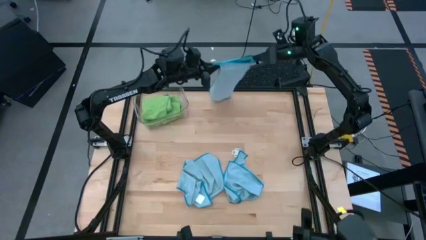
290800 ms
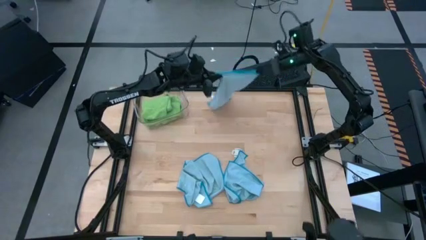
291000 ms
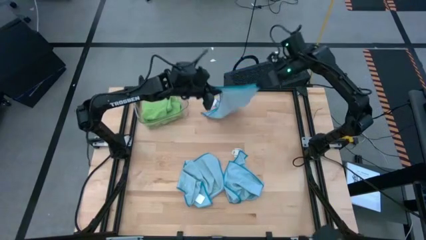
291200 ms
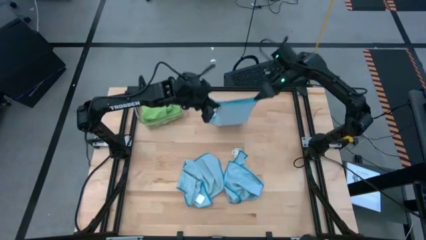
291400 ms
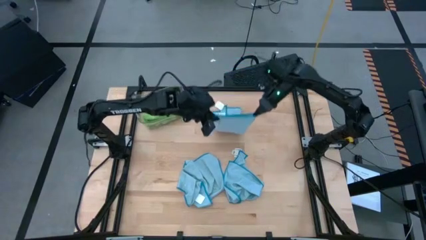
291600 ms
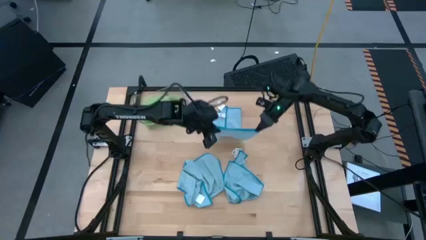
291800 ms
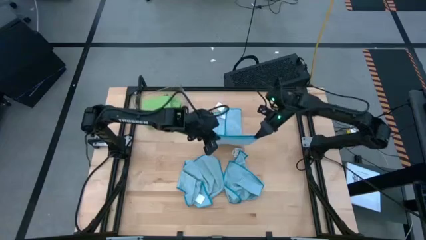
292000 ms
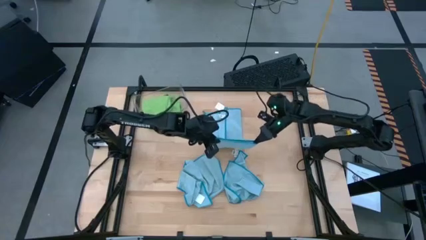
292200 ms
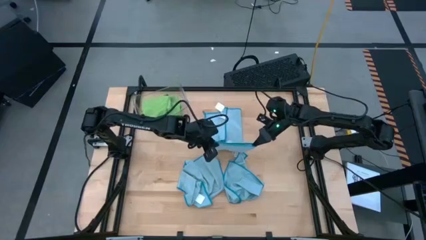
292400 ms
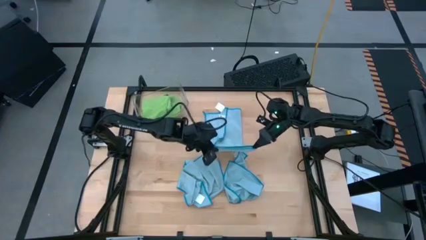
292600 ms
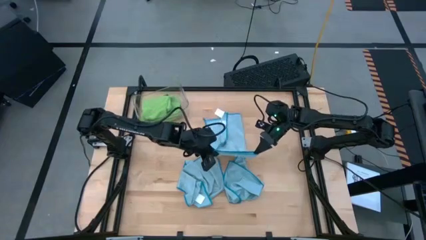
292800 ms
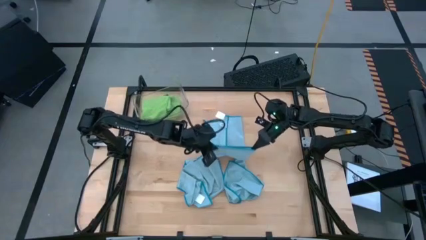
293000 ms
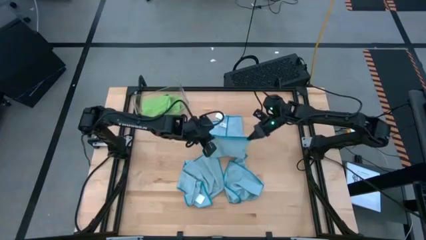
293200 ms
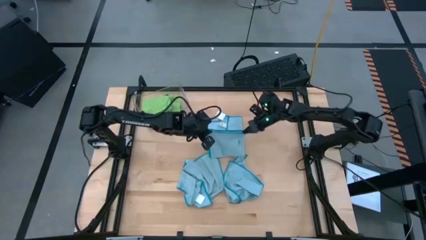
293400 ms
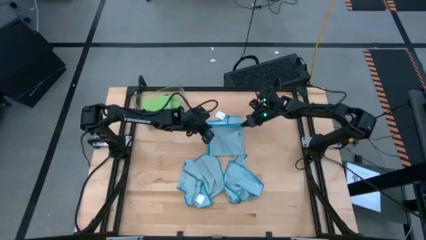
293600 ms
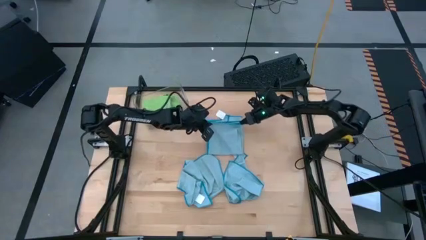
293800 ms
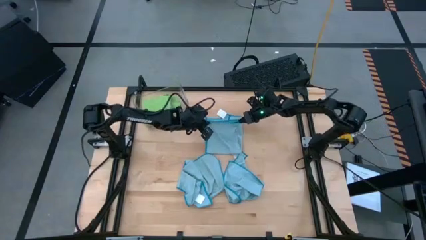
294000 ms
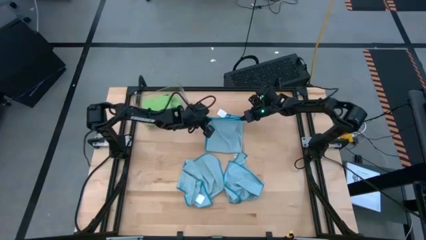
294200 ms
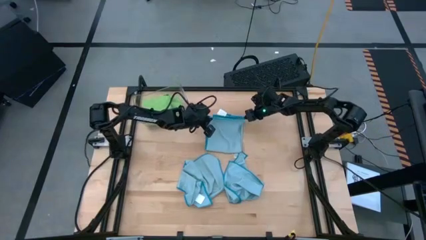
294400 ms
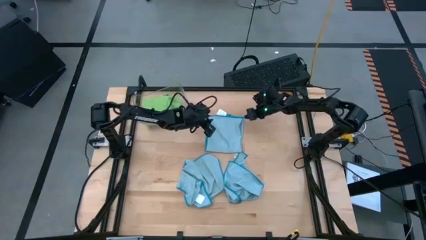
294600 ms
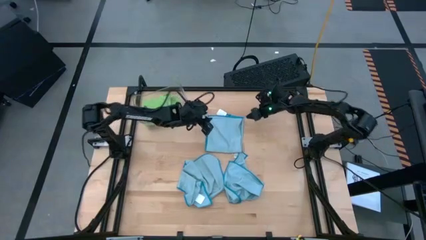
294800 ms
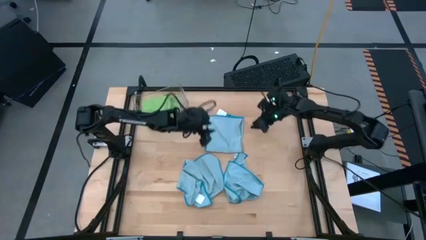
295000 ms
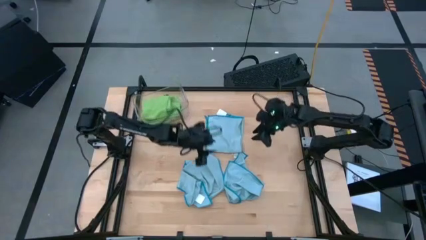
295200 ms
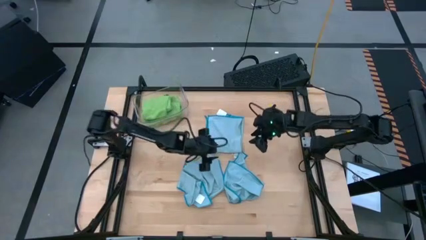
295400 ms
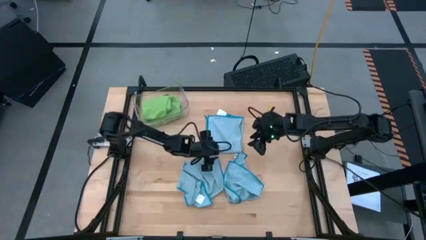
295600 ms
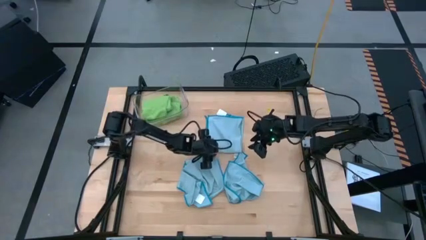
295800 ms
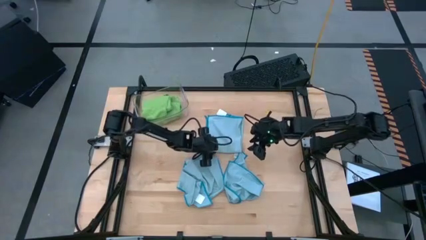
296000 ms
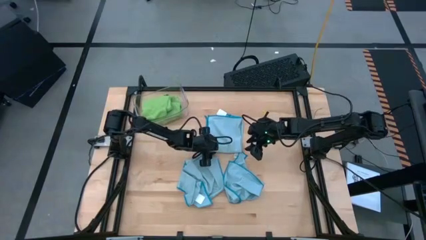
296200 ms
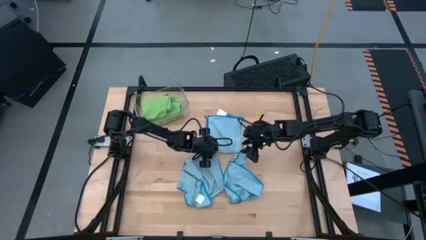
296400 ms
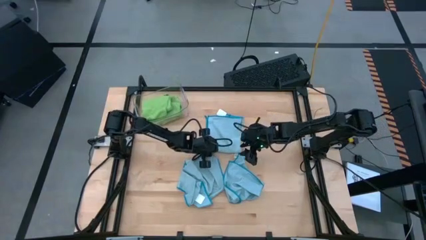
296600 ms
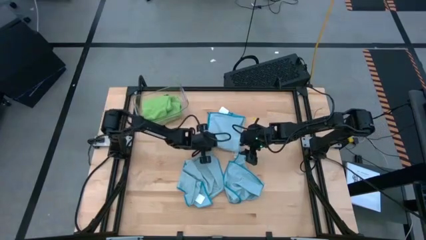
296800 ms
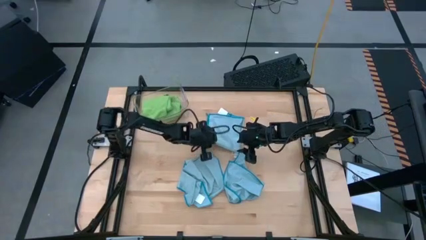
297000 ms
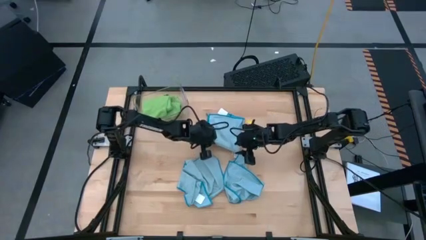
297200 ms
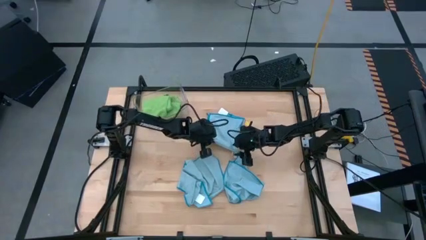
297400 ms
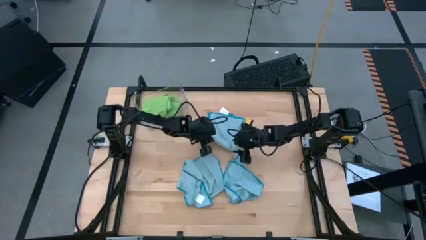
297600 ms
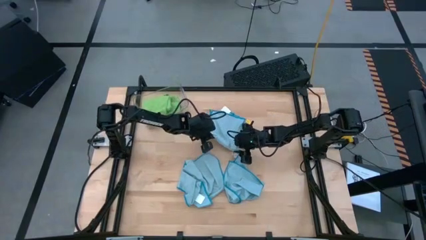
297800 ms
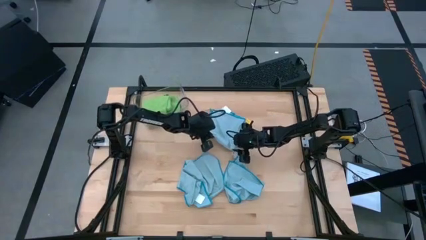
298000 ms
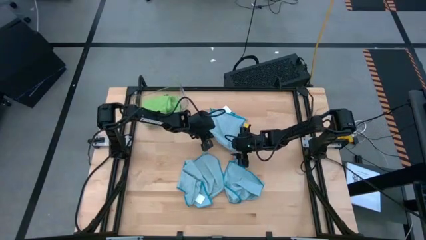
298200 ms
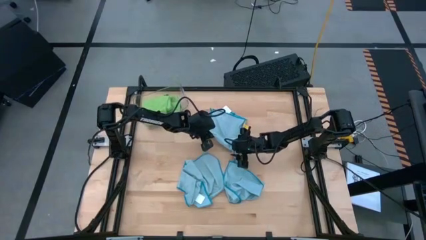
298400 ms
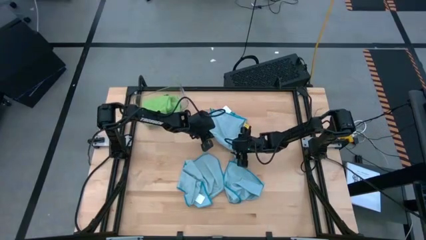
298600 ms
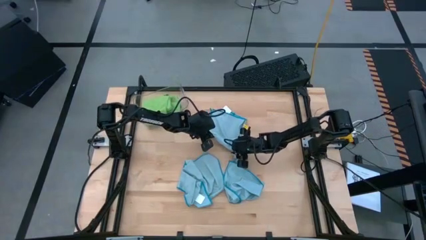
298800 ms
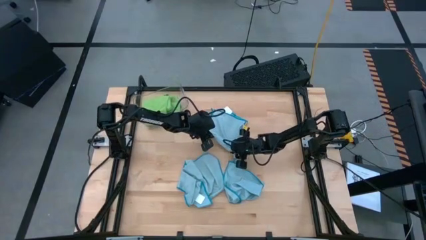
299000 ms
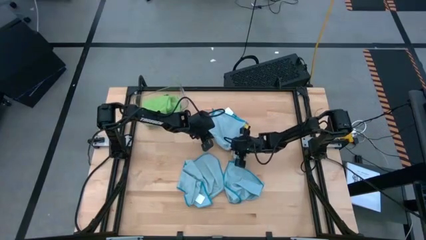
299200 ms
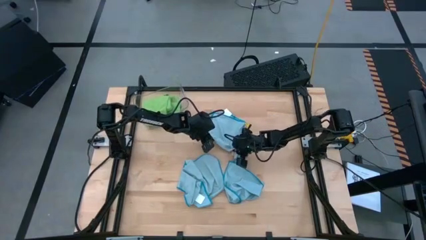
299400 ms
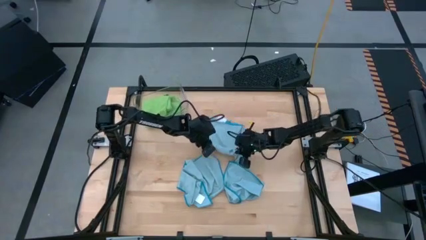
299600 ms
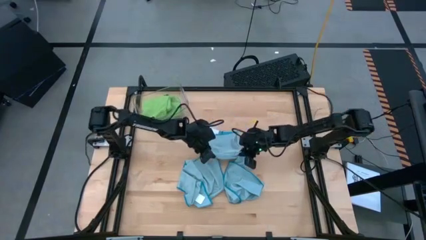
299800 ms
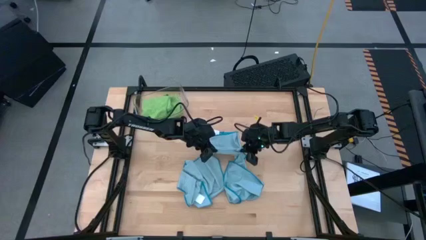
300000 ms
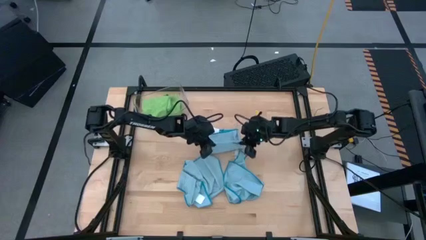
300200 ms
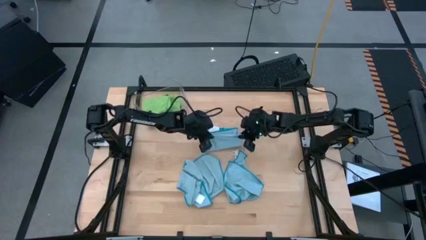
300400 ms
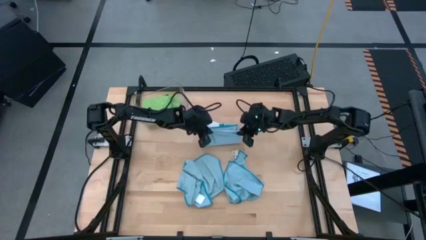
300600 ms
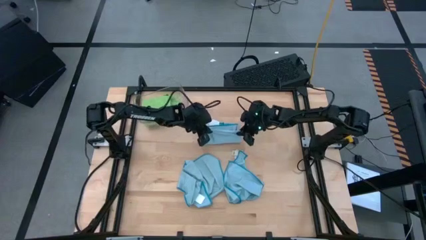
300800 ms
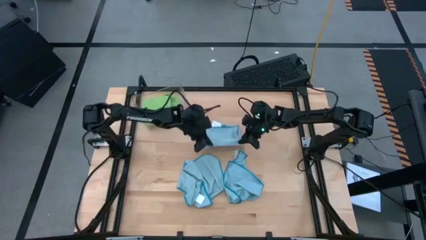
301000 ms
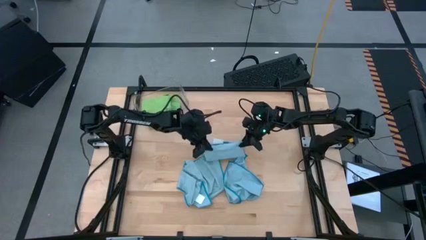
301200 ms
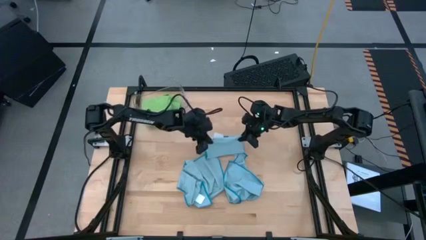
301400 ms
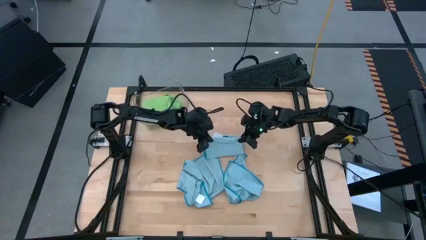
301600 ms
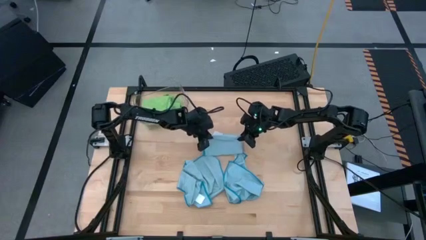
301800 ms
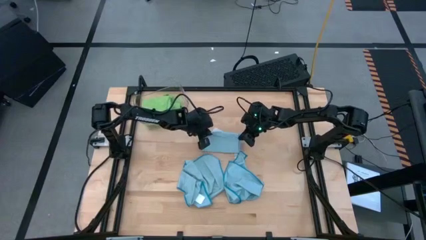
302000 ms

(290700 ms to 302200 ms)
Task: Fold microfiber towels
Fold the top center blue microfiber cloth

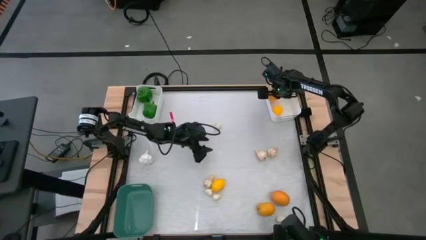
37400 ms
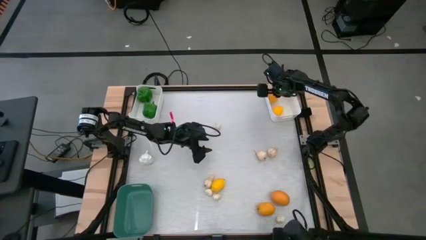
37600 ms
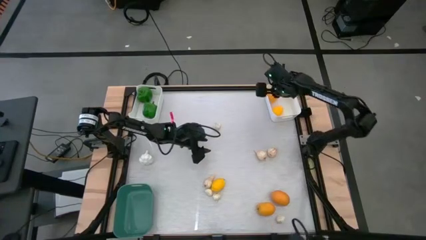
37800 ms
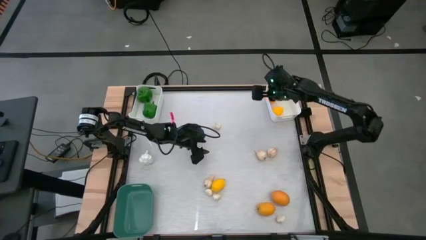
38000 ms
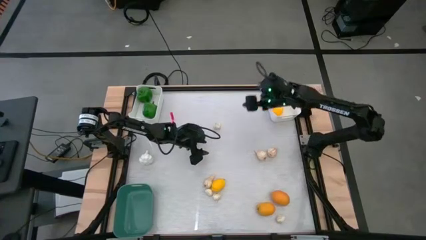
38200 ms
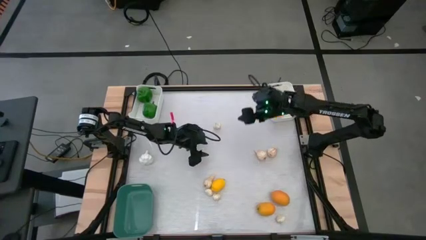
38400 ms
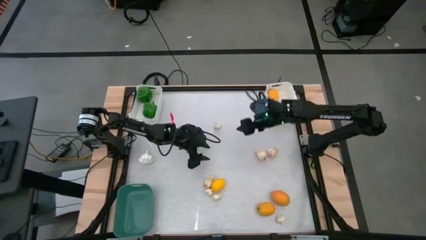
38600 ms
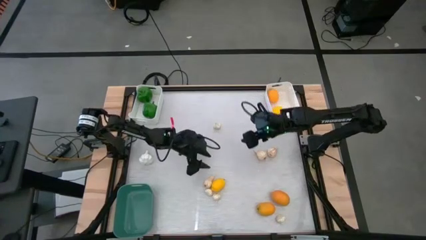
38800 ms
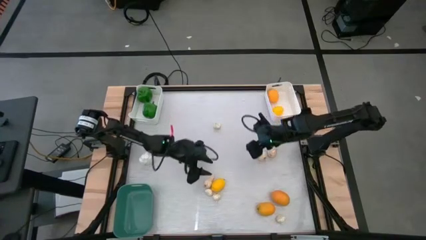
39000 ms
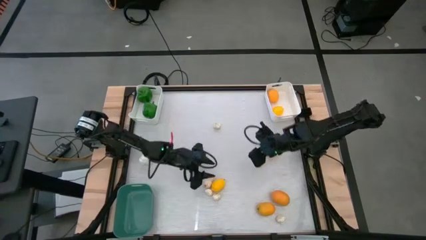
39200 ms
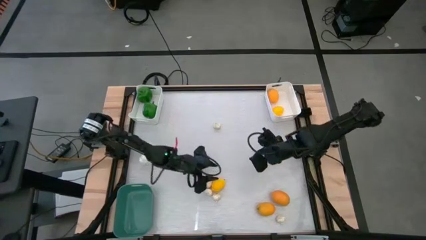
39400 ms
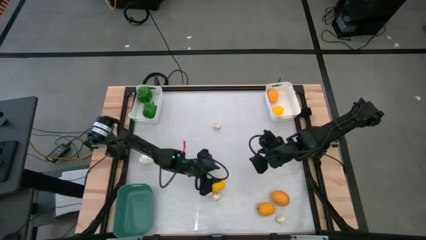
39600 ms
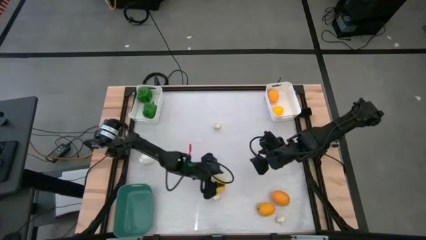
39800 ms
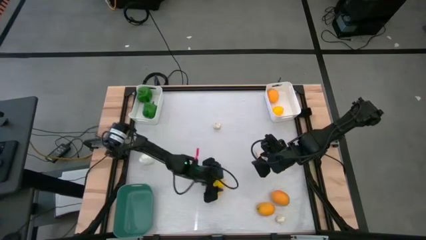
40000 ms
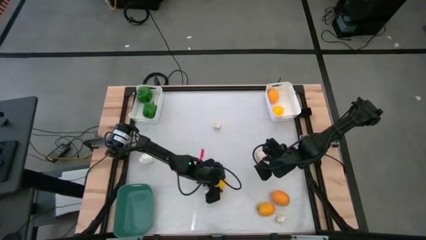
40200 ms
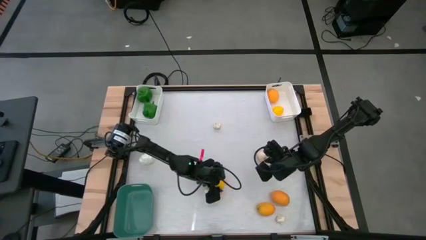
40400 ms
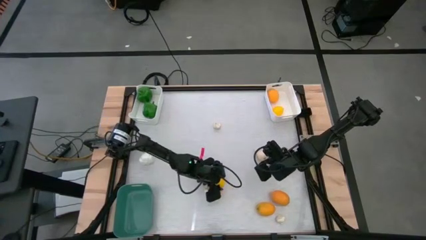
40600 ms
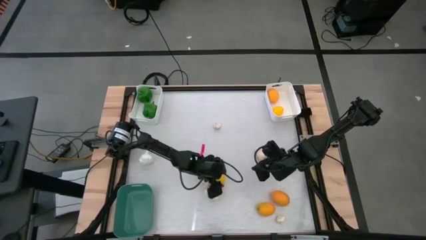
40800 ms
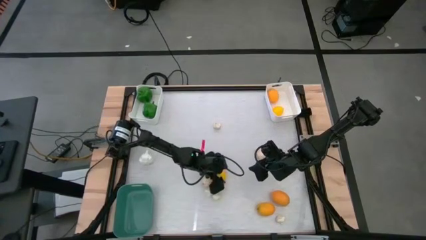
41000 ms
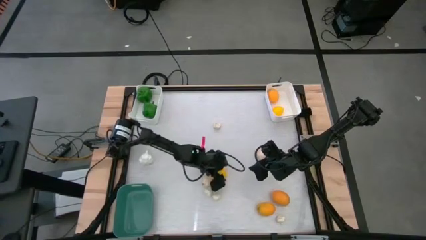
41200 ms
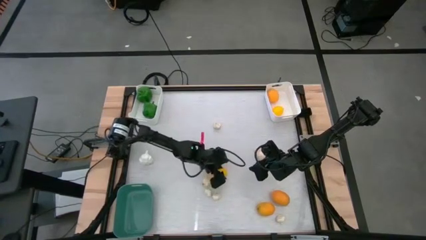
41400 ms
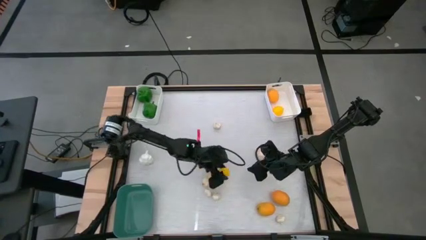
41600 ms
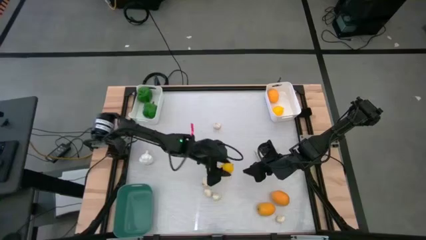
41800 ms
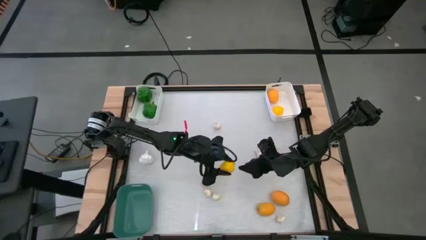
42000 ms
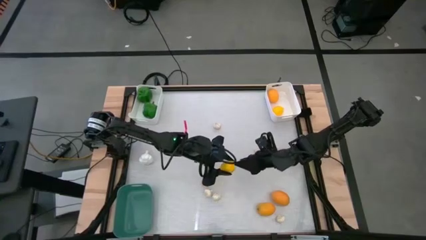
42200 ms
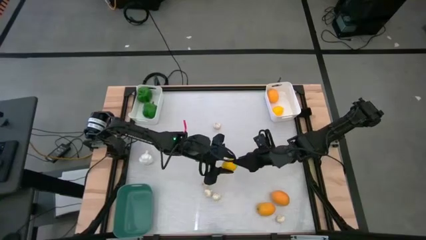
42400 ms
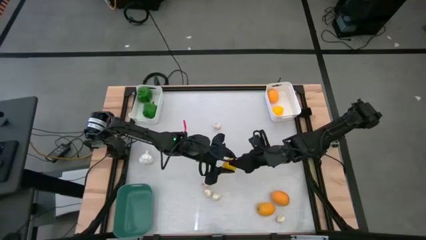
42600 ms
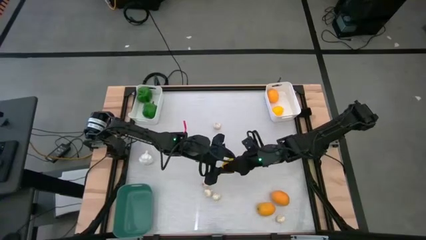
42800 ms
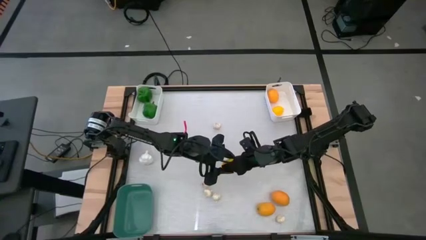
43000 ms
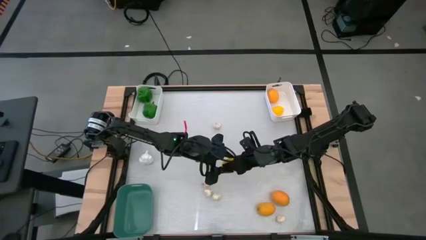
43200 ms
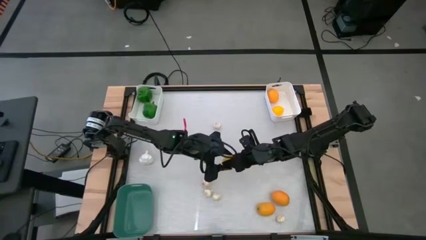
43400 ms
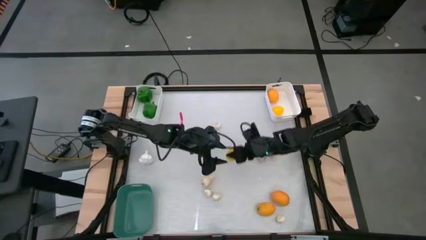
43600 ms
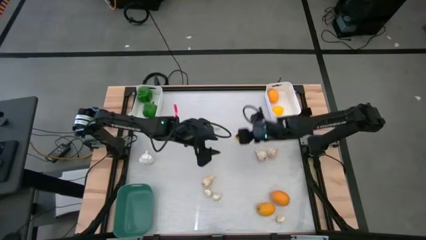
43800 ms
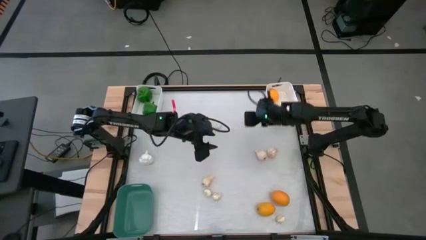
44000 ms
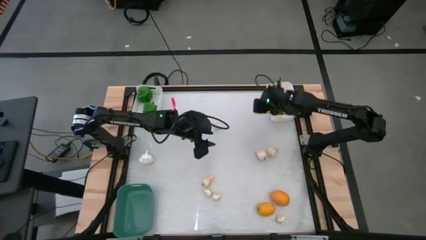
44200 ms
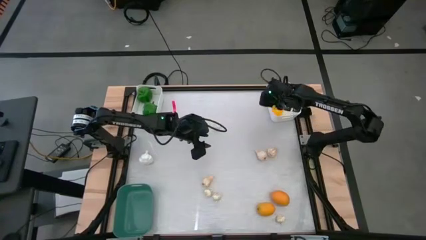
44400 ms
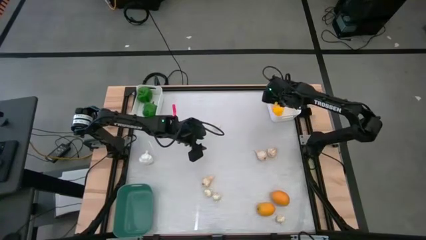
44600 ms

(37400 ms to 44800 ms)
Task: Sort produce into baskets
Put the yellow lemon into the right white bin
